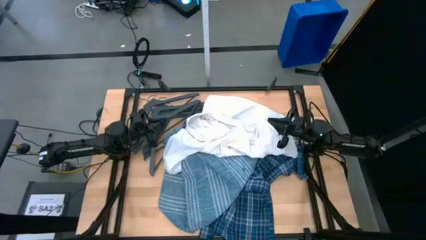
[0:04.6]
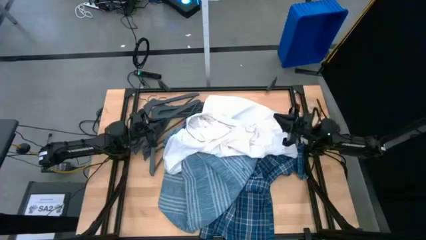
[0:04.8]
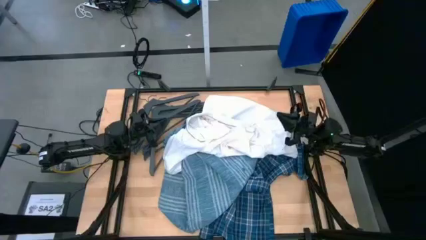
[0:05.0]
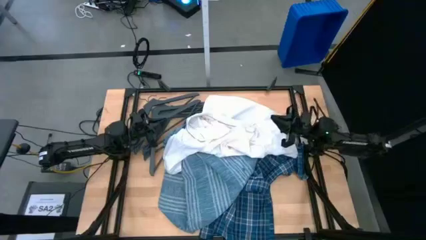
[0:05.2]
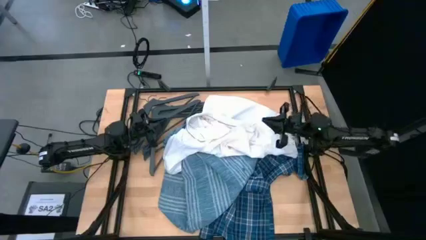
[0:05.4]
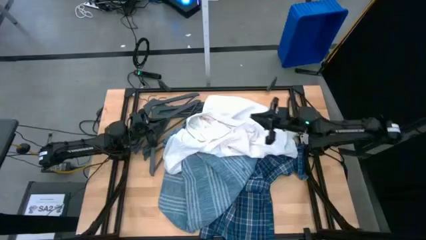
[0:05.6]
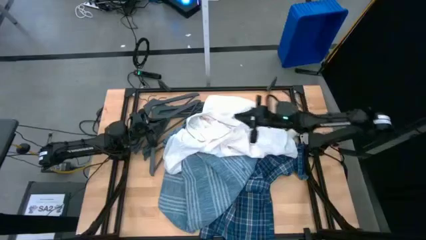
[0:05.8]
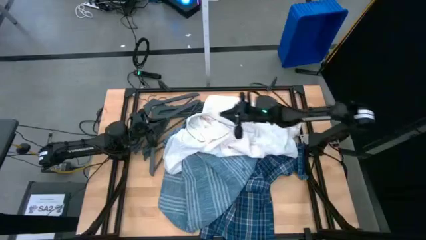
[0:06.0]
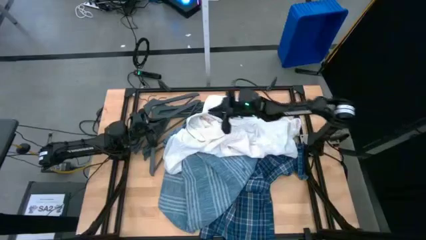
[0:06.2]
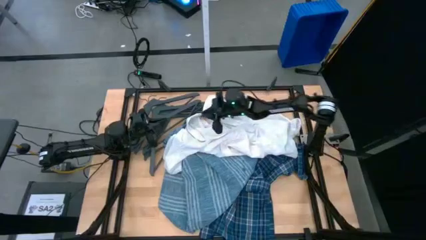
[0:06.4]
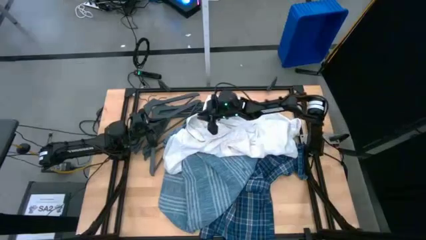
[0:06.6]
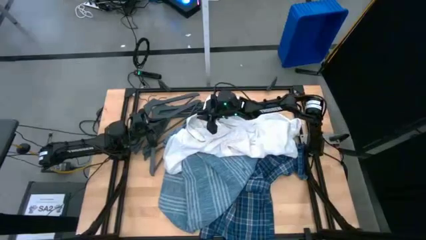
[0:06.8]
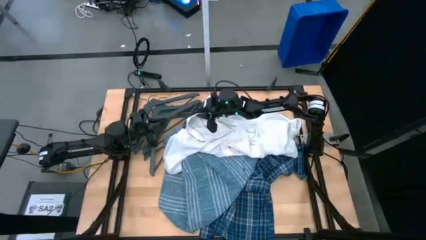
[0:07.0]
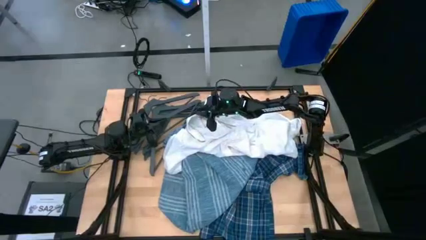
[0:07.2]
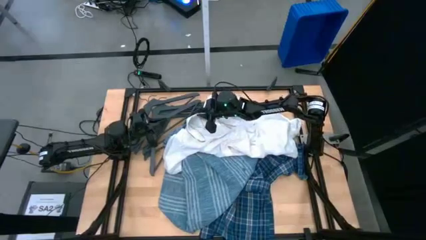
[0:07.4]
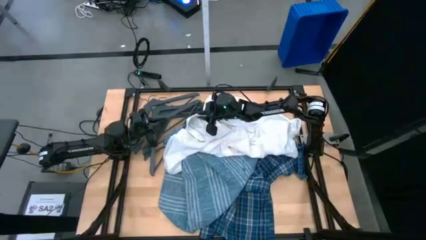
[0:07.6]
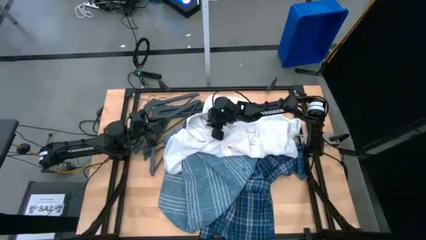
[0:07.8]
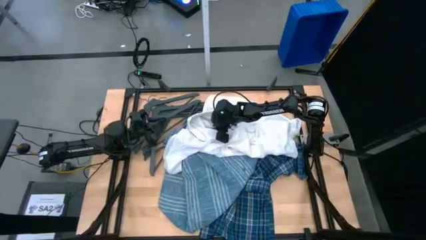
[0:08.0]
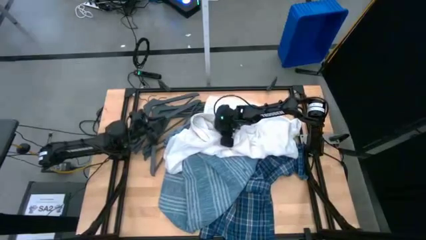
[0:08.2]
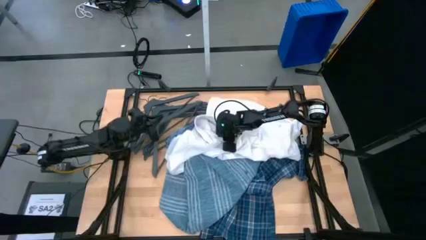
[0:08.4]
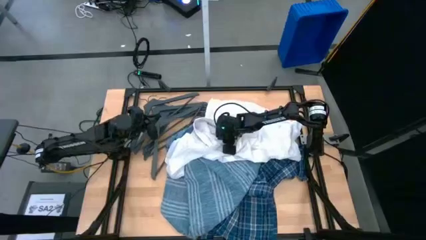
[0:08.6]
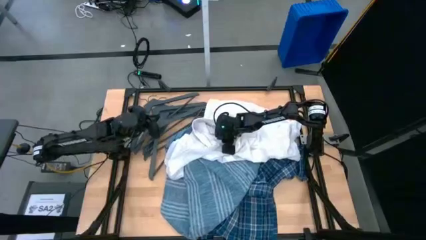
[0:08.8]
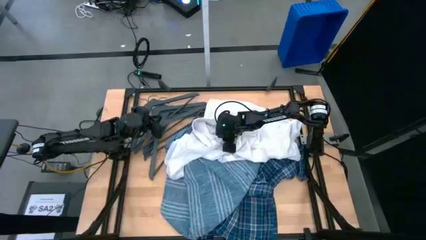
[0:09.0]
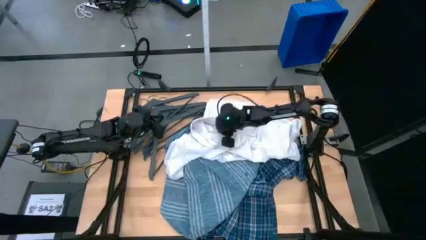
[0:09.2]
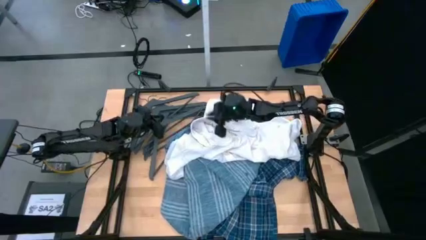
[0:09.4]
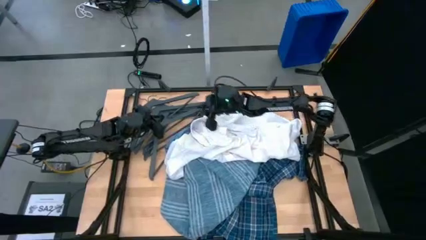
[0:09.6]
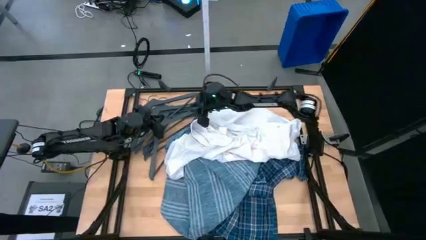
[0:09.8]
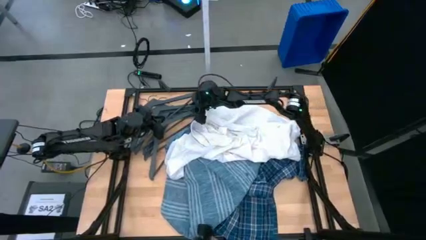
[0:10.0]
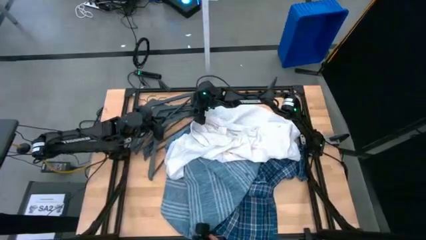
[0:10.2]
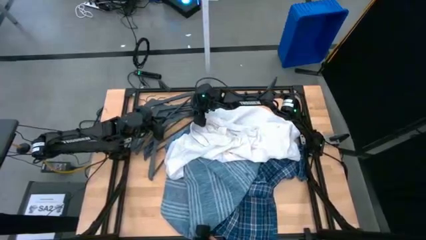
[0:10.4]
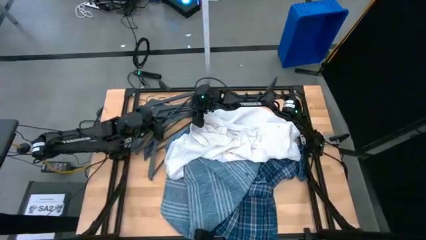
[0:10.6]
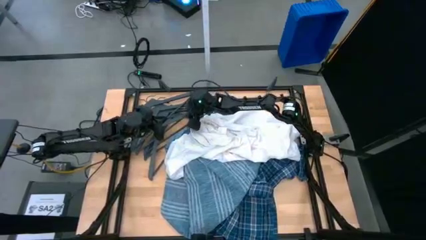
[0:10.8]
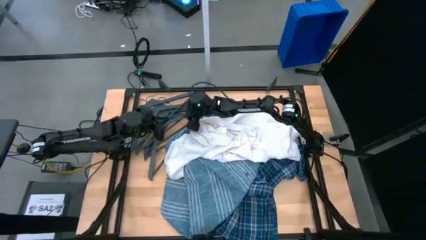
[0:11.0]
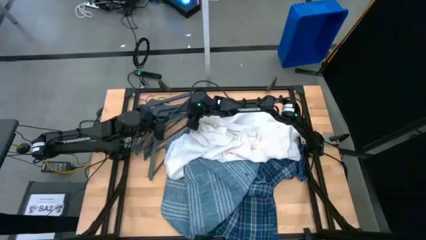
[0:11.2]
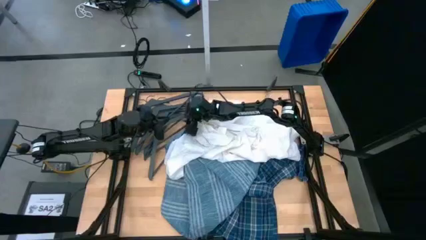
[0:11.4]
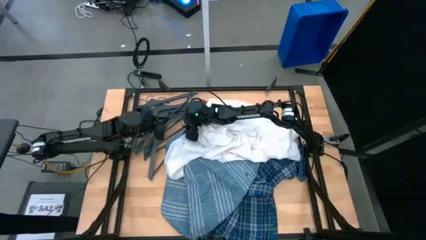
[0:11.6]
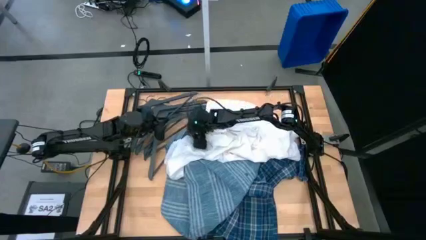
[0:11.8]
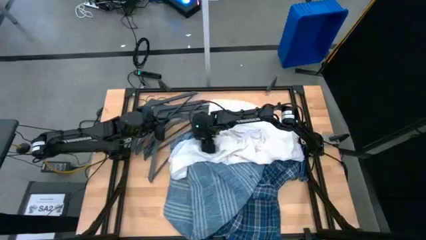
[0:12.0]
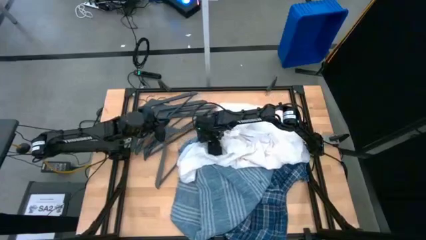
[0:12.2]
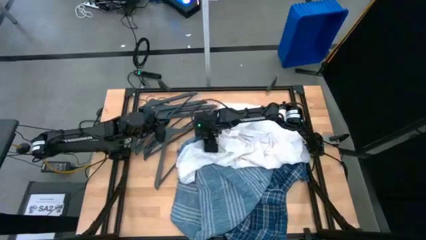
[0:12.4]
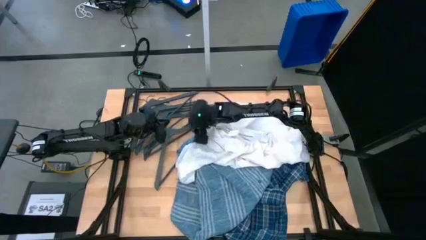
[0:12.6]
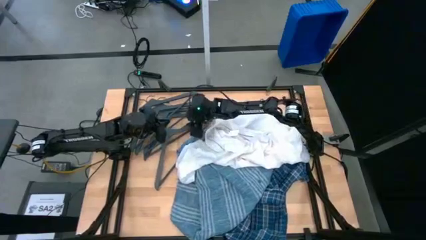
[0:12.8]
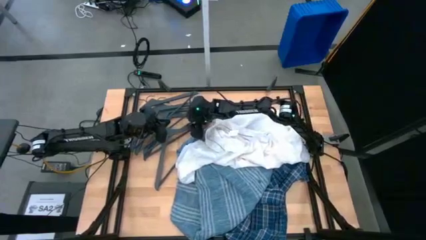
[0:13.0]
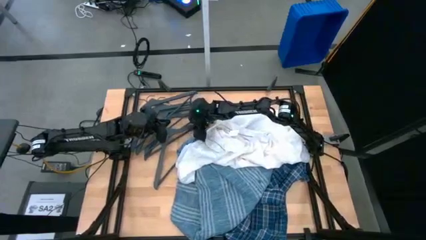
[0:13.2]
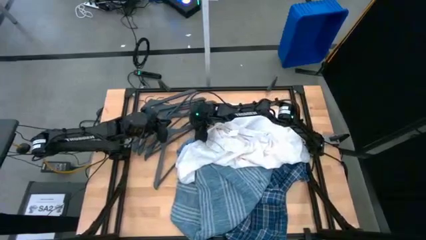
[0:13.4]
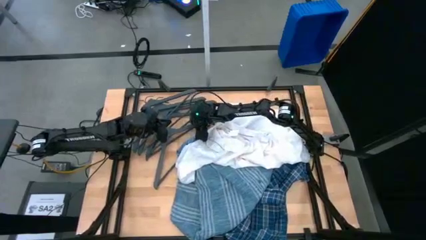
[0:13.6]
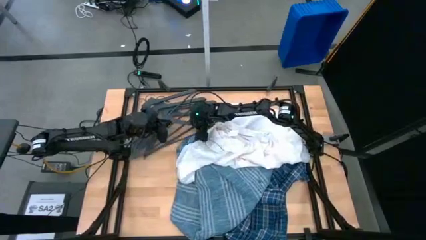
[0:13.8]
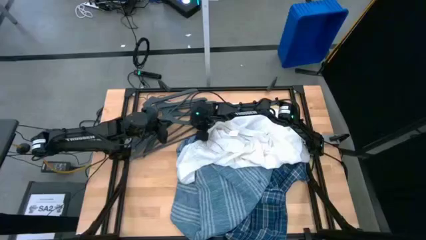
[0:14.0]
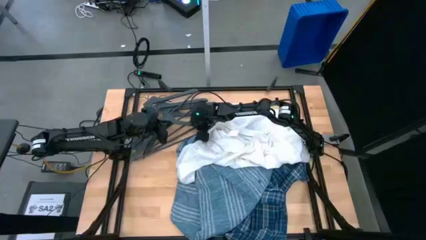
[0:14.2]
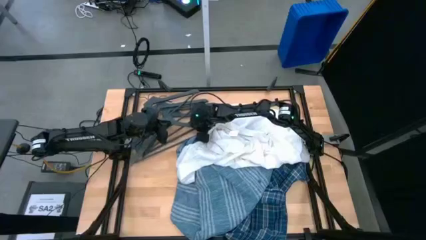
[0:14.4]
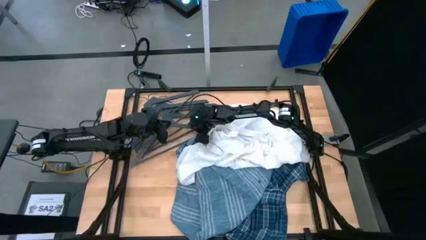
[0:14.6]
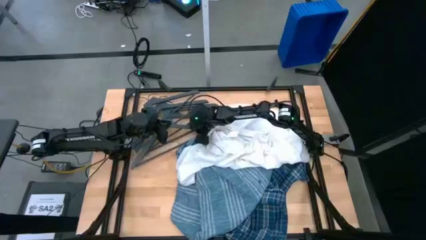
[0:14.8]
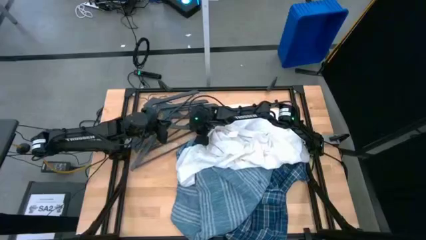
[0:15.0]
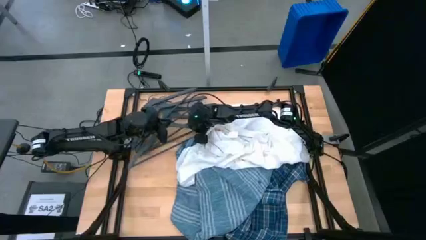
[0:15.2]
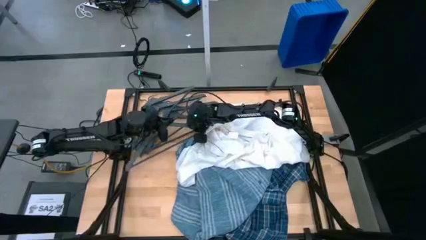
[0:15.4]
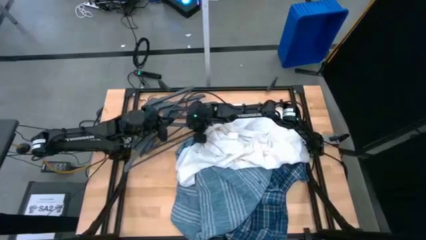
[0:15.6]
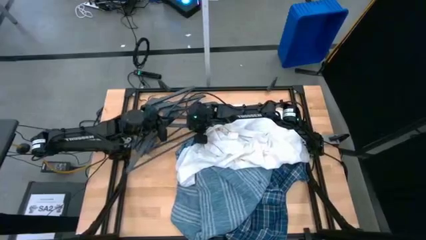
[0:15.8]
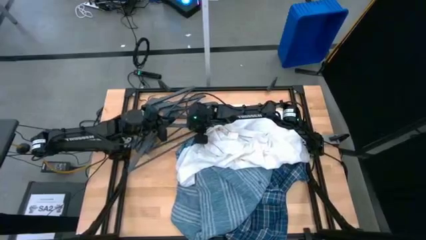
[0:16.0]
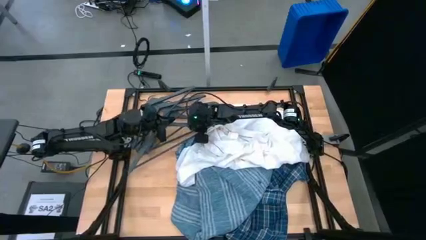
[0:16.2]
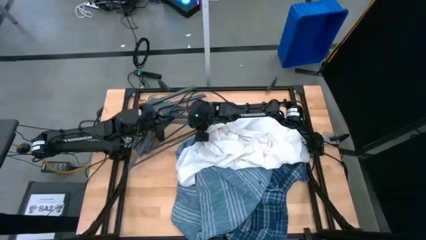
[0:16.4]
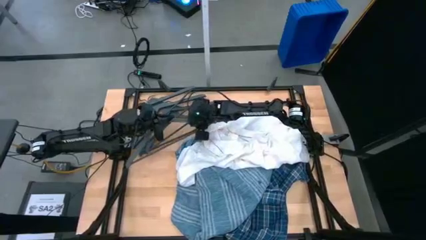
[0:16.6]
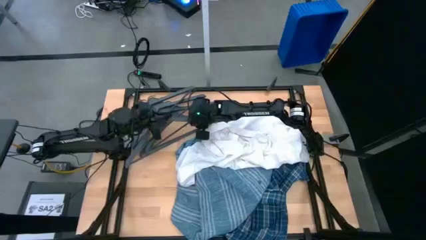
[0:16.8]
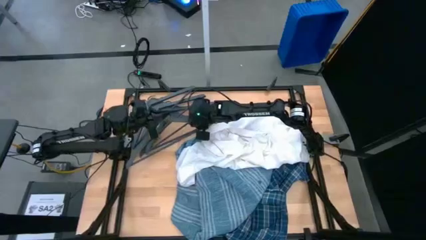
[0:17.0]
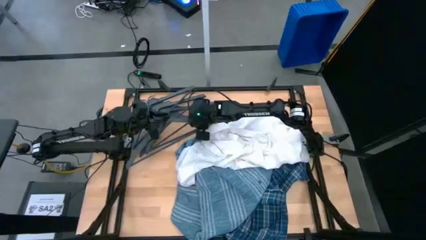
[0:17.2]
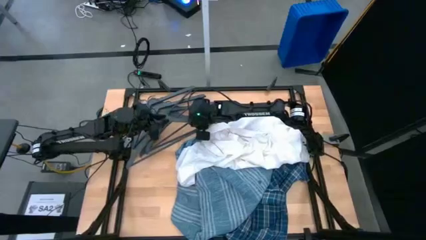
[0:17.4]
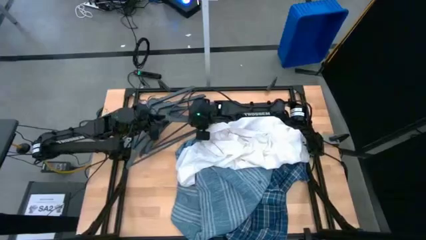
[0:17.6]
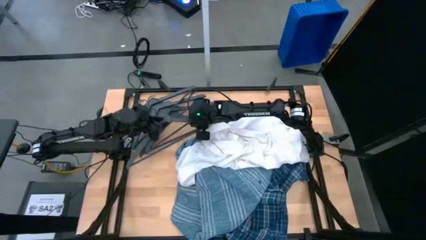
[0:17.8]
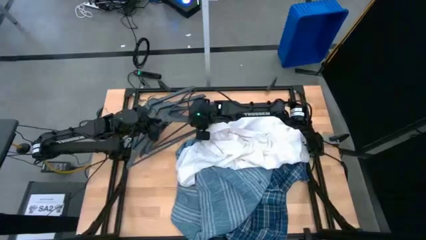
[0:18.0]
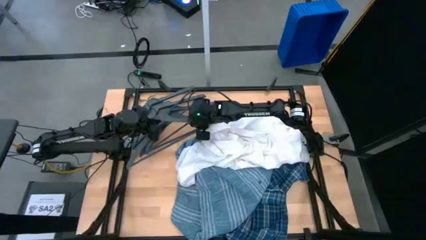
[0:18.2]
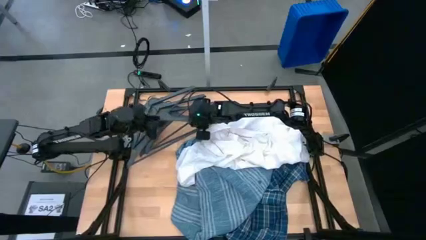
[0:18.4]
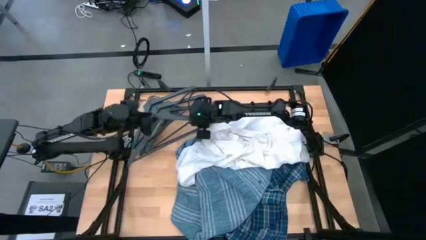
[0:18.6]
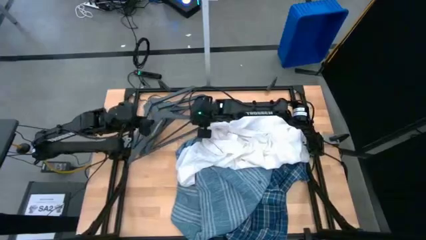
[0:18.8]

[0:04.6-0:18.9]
Task: Hang clothes
Insert the black hanger into the white shirt
